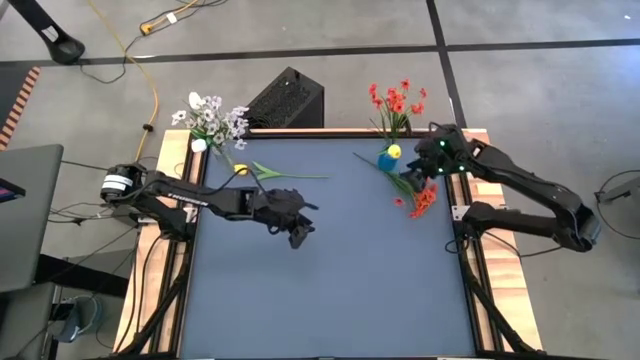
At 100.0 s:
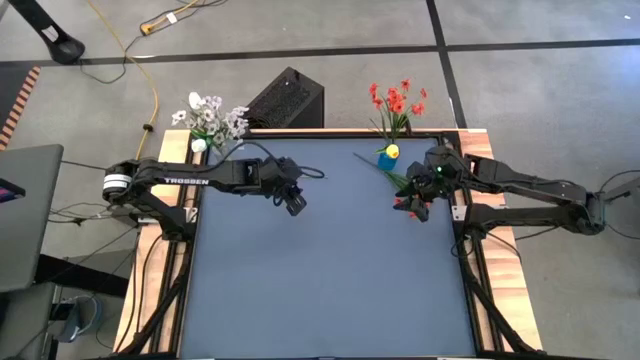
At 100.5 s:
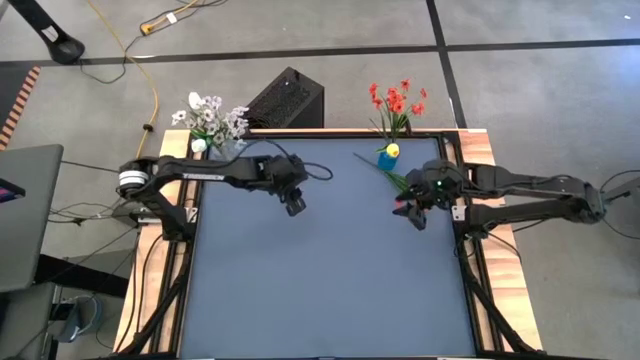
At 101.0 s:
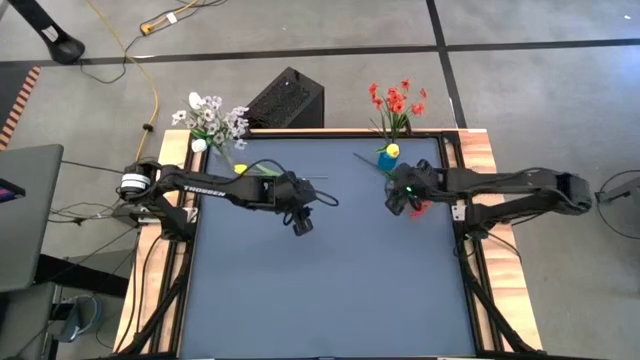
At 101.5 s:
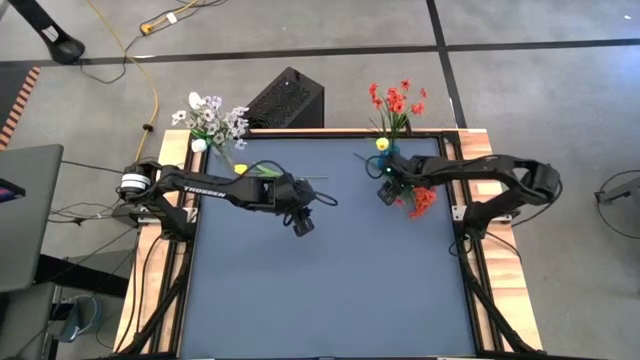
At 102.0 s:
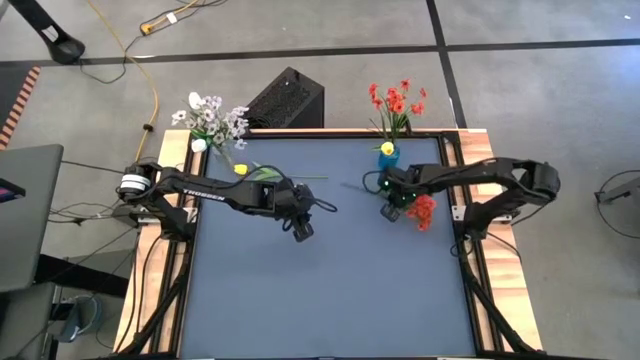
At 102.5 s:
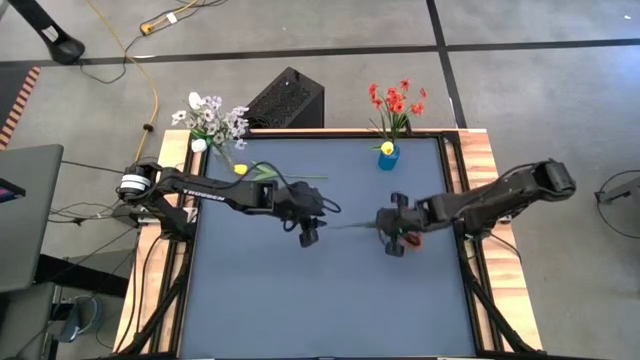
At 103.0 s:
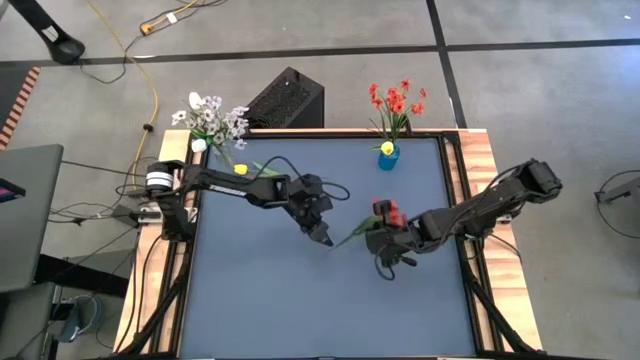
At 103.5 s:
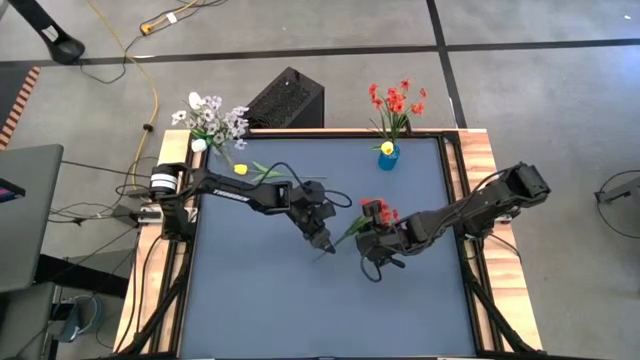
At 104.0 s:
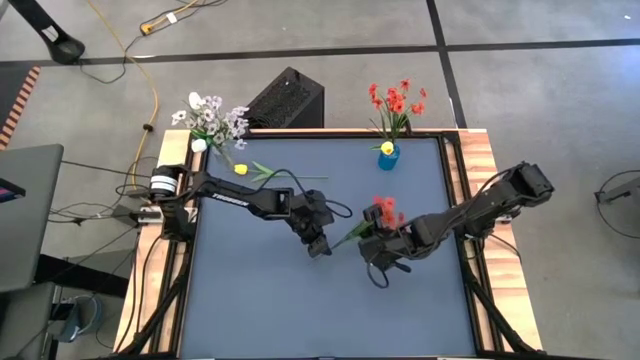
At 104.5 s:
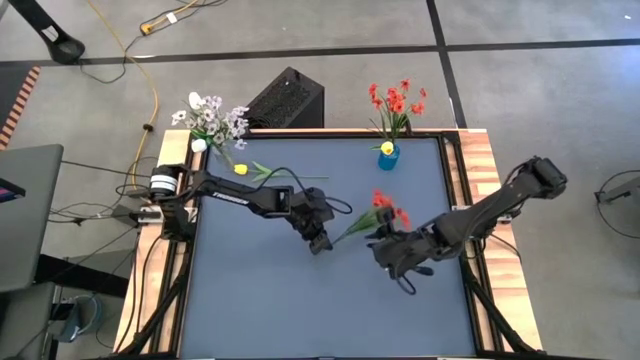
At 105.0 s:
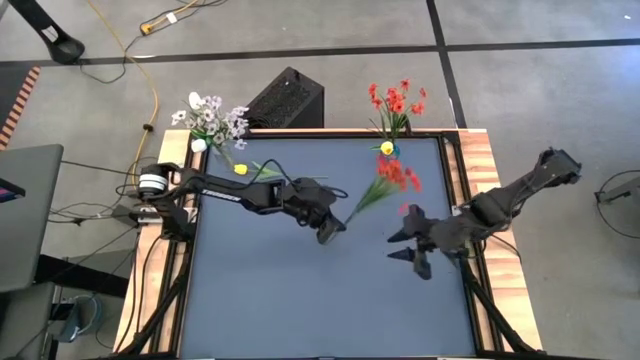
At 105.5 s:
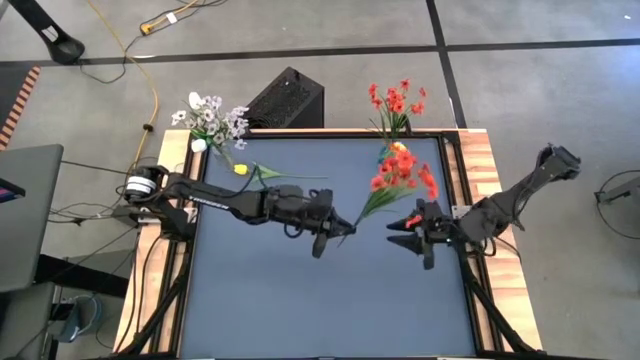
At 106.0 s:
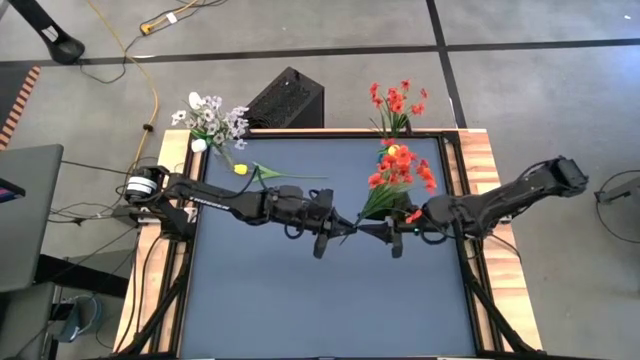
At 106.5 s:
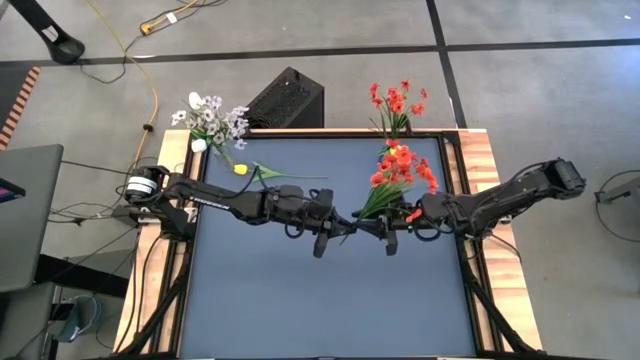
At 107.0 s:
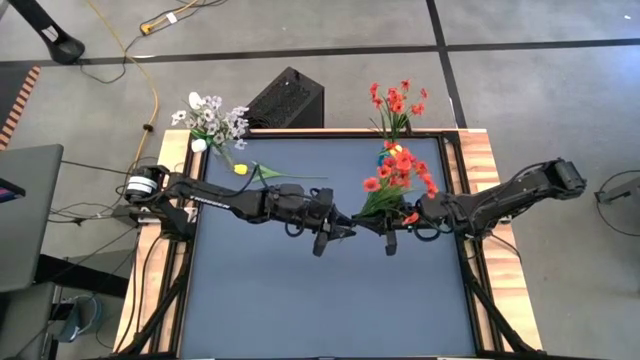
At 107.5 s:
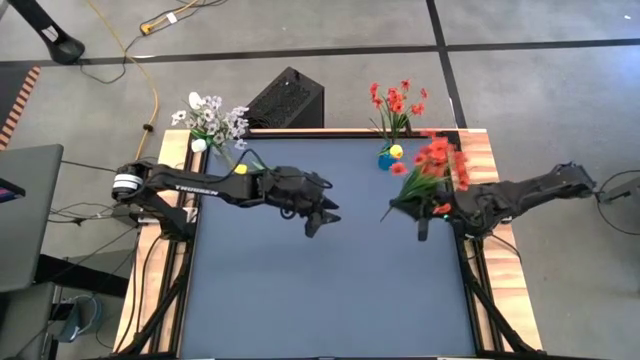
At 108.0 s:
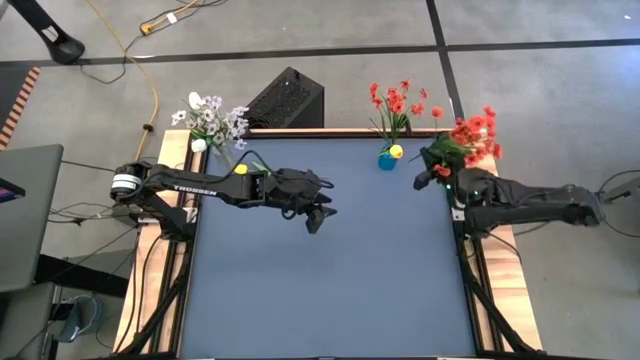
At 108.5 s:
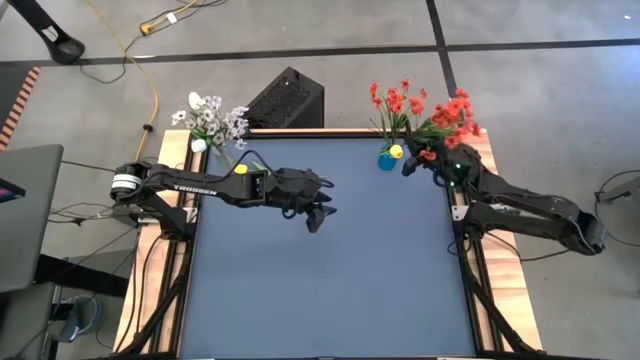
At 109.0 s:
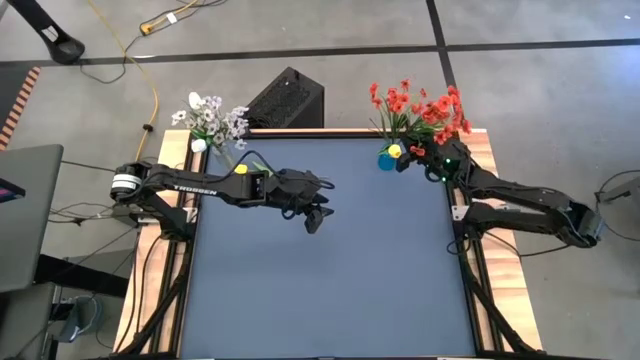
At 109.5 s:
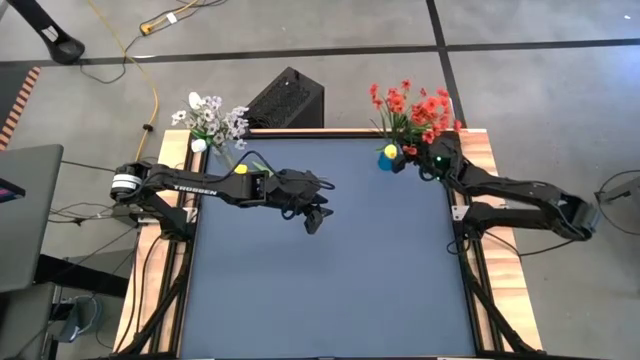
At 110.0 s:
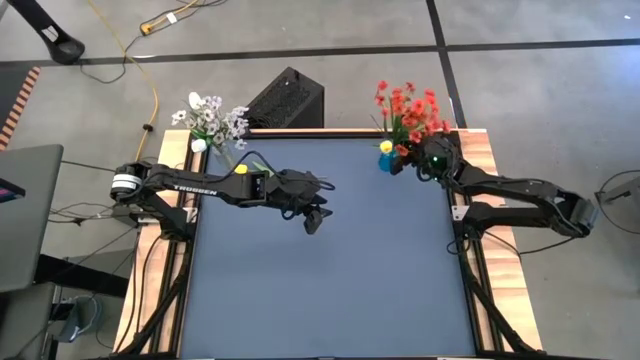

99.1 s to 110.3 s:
Task: Sort flowers into vase by color
Put the orange flowers into the blue vase

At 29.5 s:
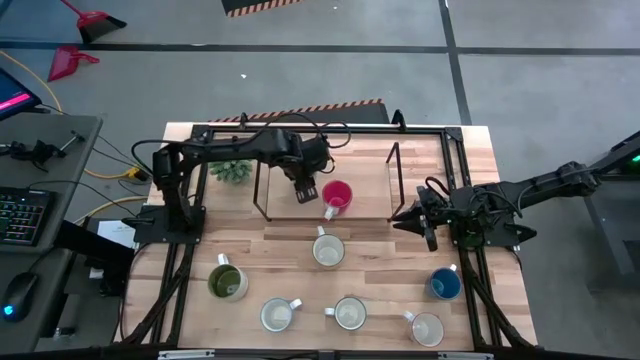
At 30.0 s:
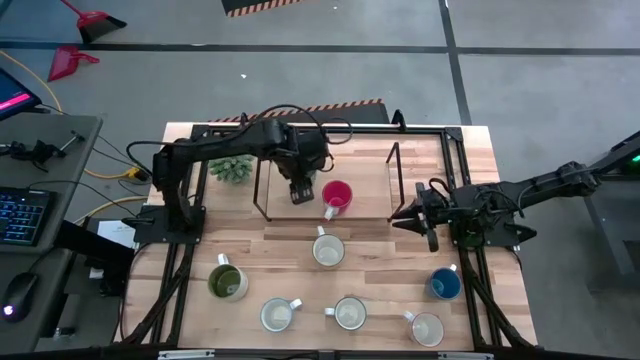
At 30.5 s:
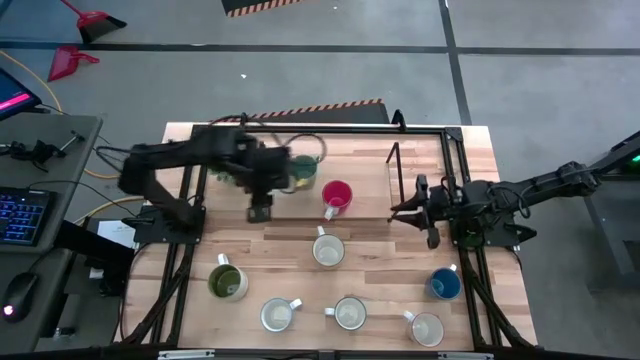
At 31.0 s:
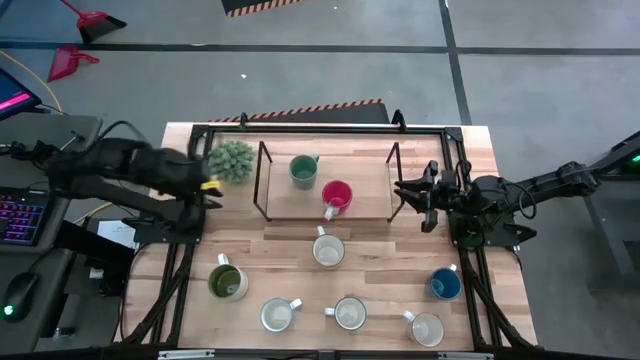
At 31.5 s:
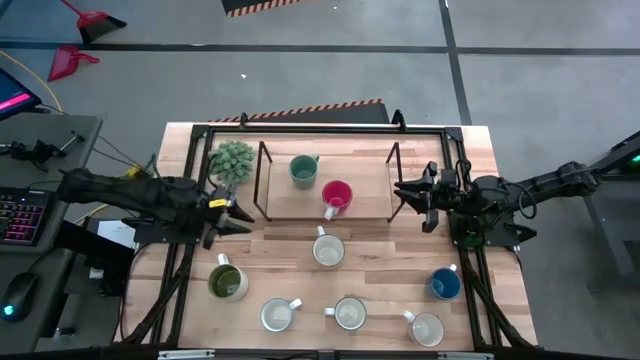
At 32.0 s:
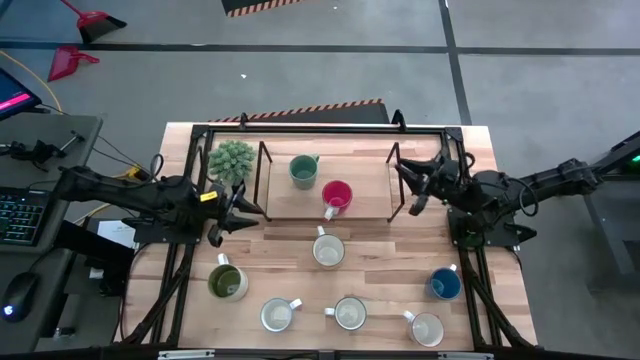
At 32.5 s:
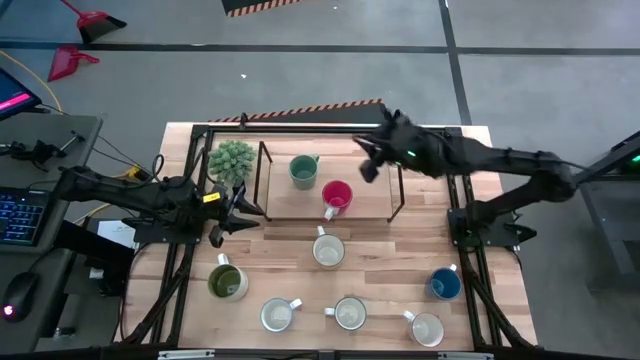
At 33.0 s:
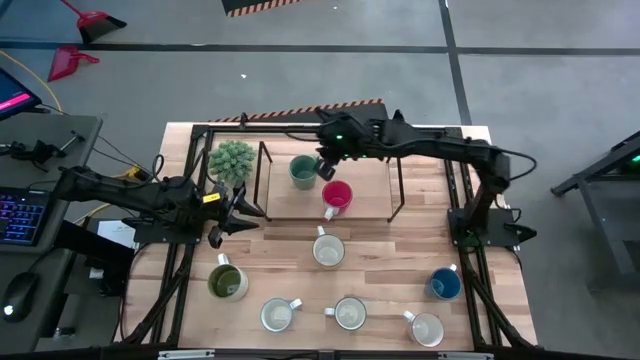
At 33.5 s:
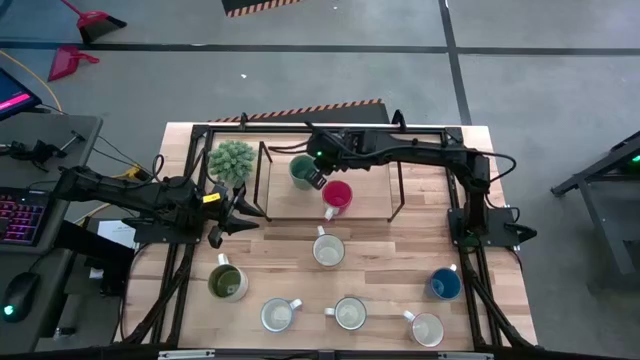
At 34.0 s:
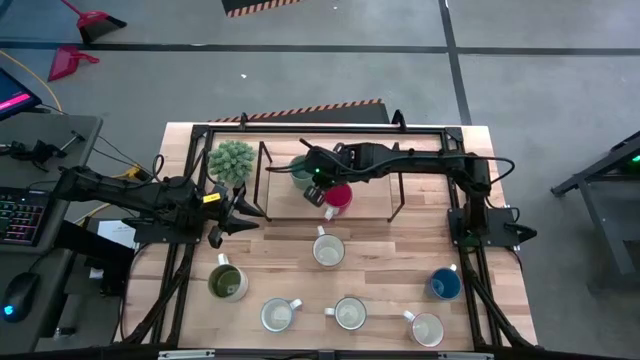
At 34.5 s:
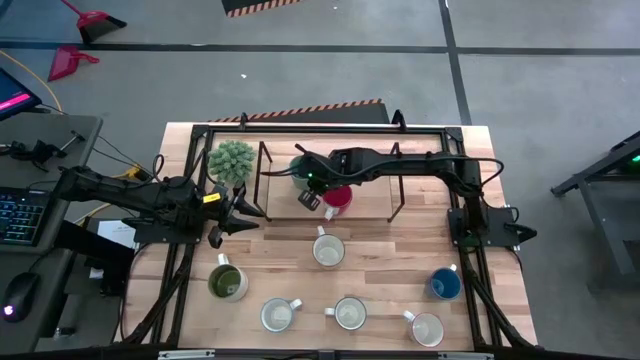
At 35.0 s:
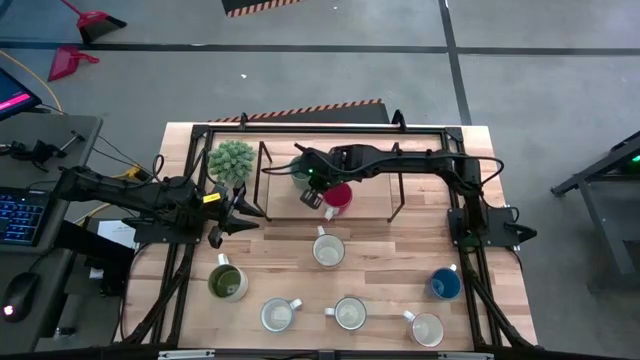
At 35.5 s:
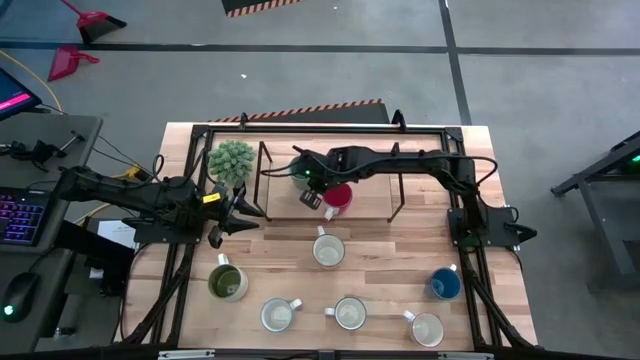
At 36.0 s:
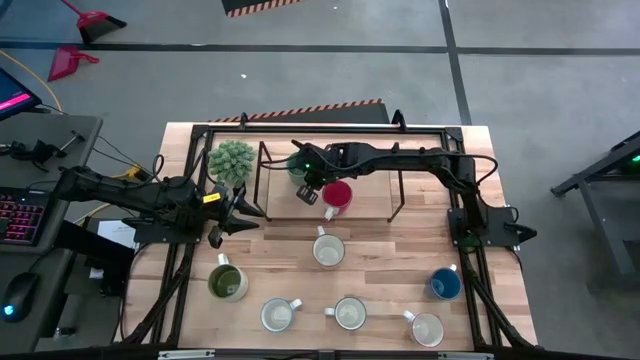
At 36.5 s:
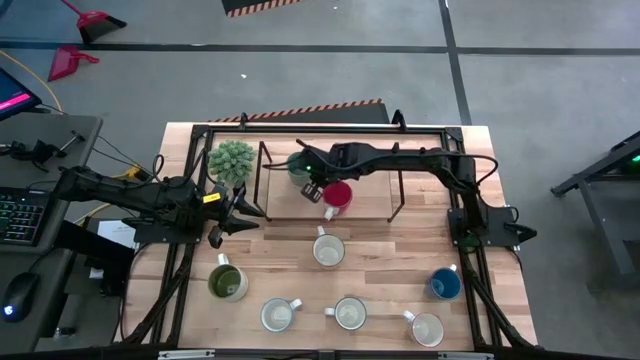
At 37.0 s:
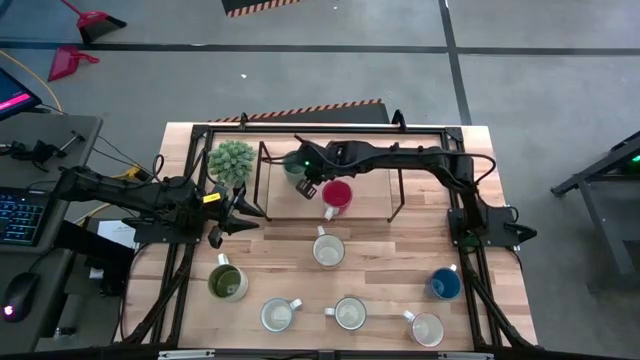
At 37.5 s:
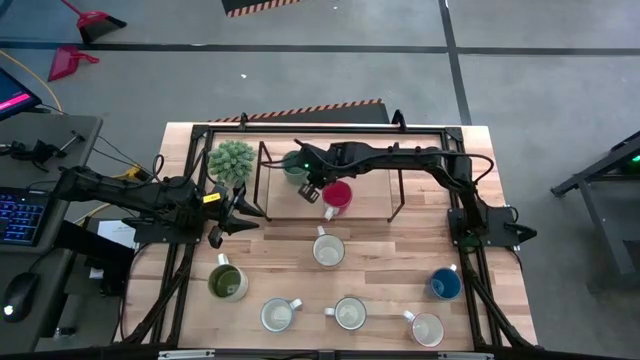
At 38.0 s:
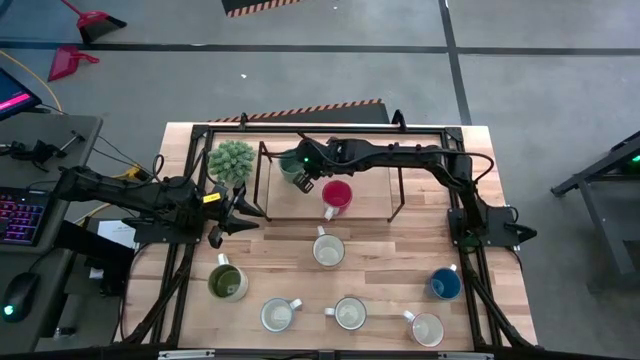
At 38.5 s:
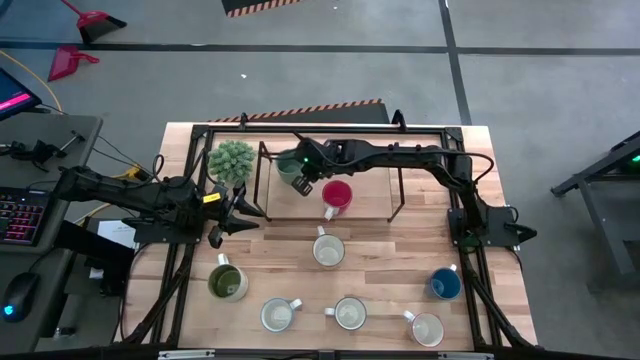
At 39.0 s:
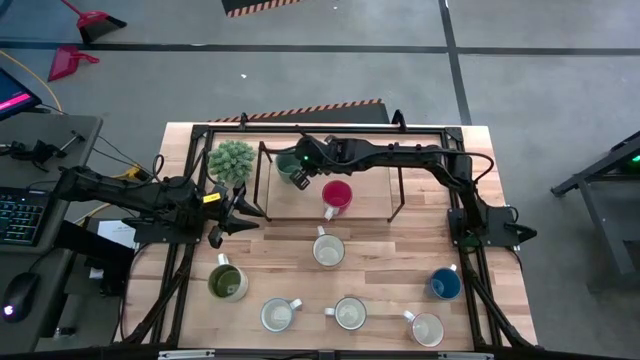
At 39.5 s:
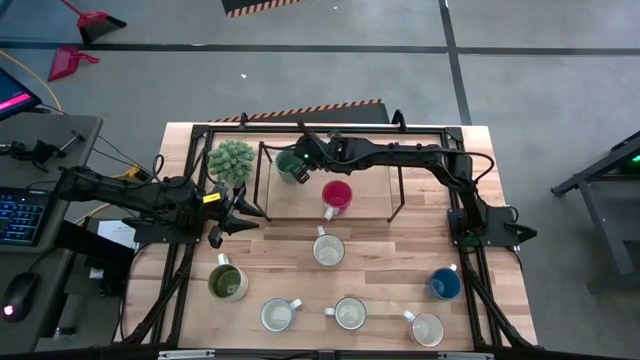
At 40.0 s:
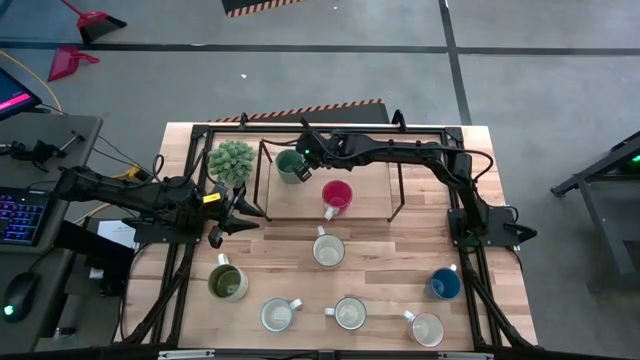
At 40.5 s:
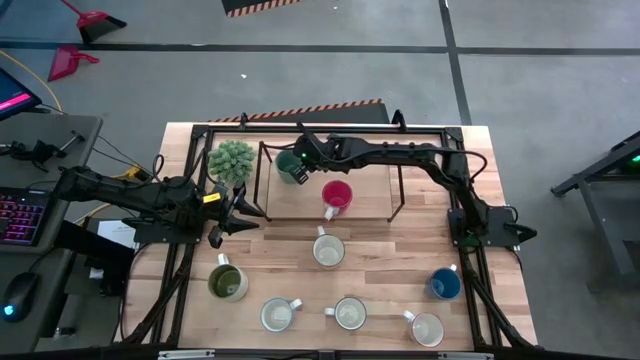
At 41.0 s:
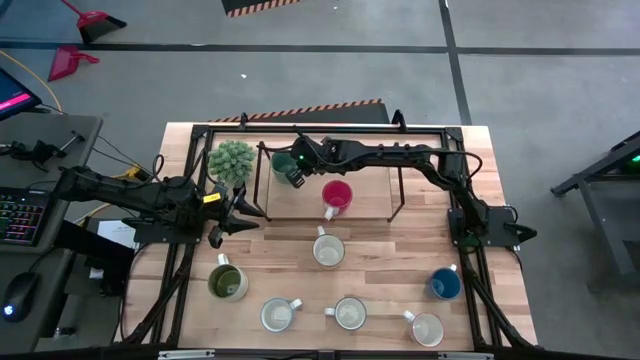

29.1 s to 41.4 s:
Task: Place coffee mugs
Put the green mug on the shelf
